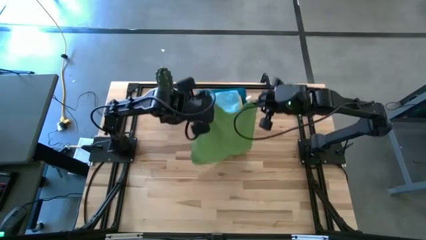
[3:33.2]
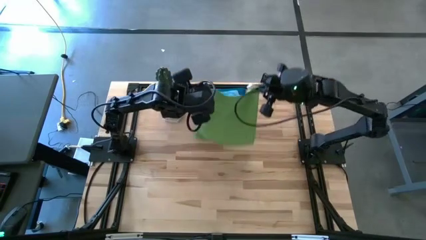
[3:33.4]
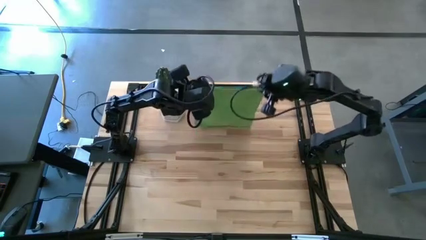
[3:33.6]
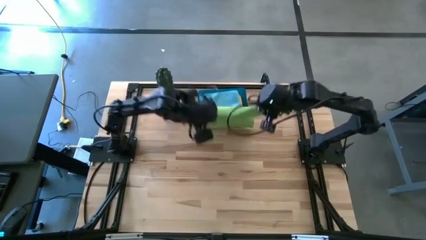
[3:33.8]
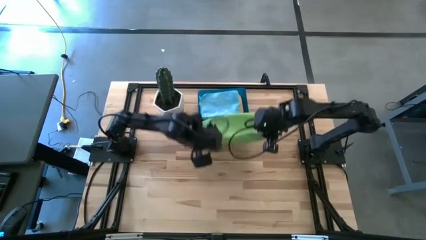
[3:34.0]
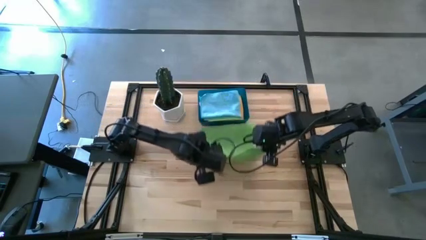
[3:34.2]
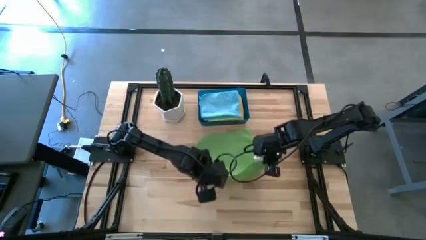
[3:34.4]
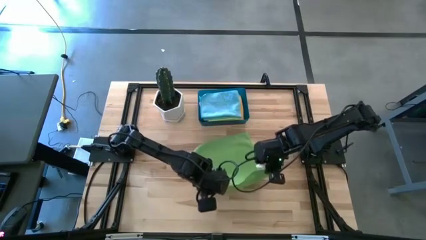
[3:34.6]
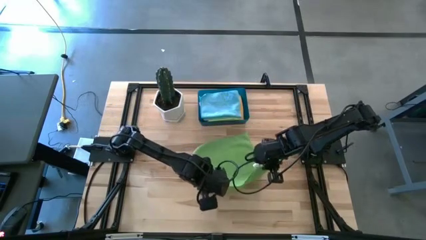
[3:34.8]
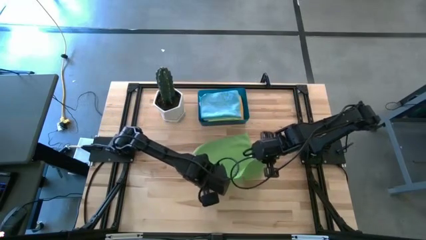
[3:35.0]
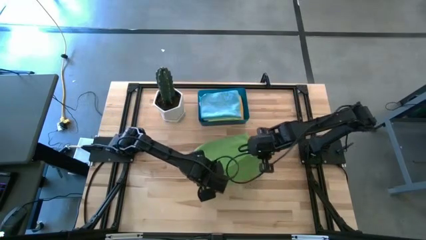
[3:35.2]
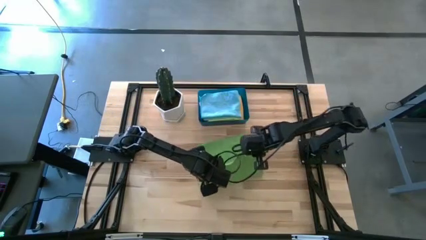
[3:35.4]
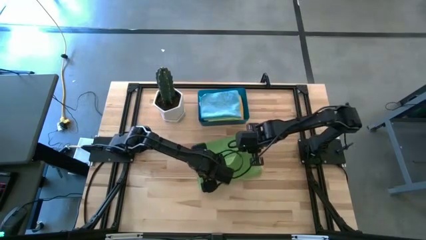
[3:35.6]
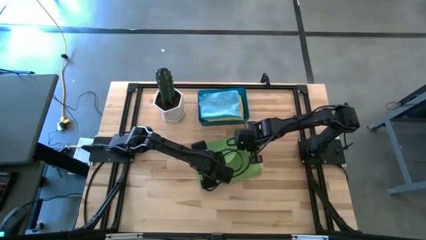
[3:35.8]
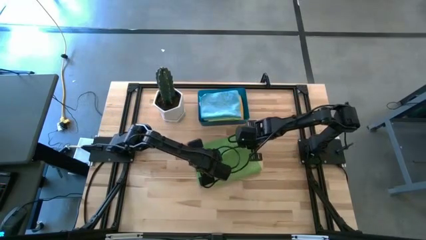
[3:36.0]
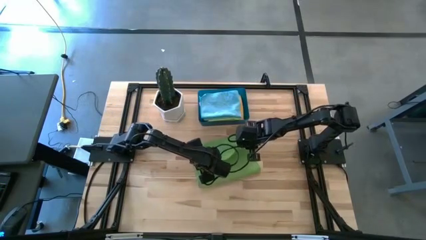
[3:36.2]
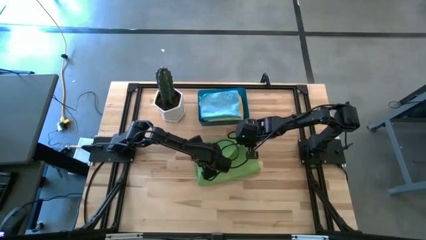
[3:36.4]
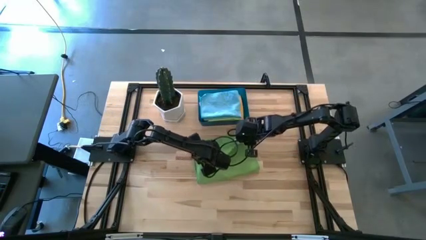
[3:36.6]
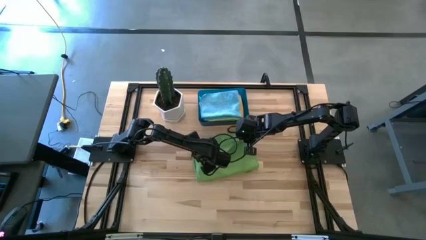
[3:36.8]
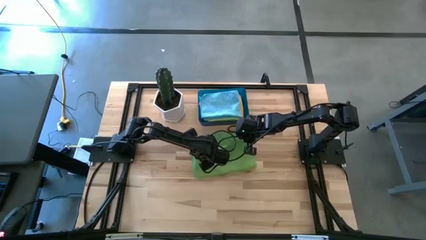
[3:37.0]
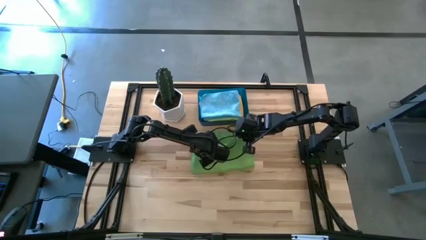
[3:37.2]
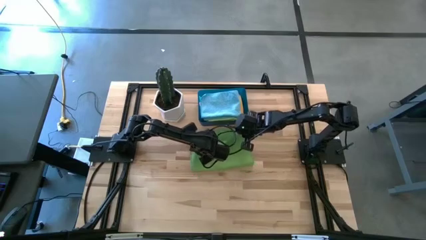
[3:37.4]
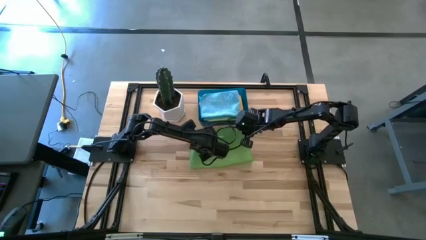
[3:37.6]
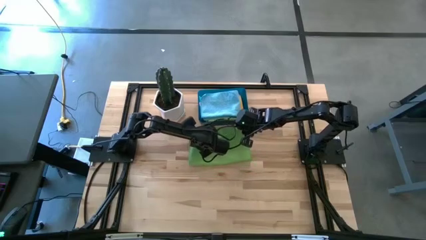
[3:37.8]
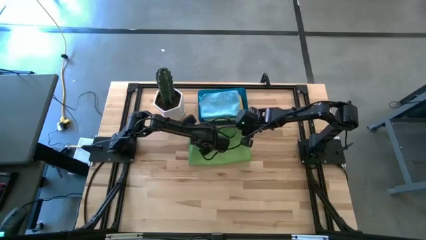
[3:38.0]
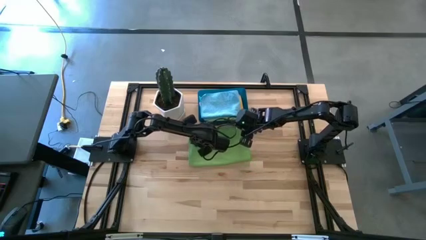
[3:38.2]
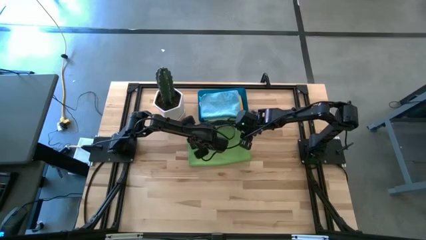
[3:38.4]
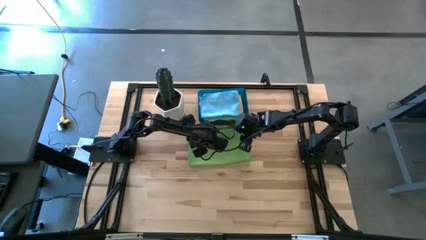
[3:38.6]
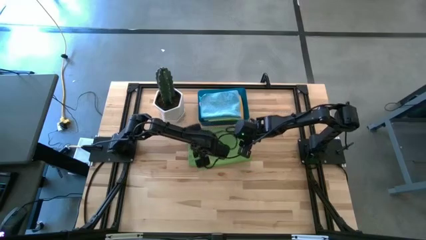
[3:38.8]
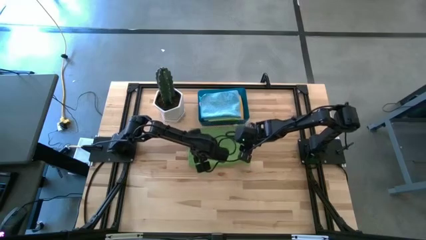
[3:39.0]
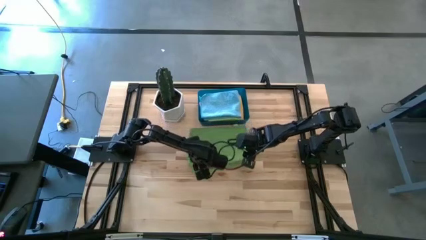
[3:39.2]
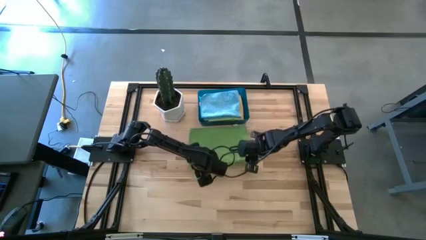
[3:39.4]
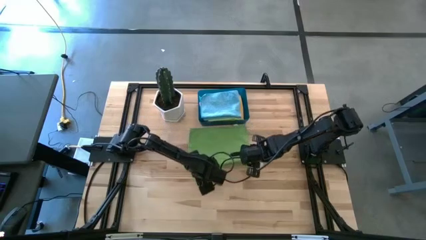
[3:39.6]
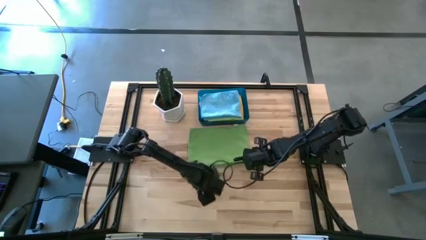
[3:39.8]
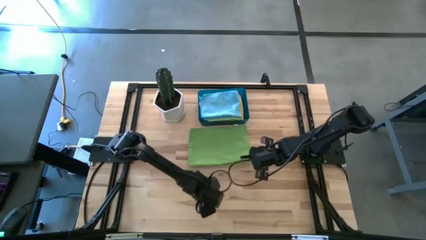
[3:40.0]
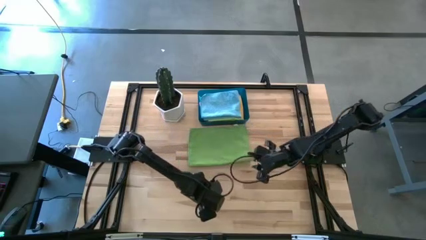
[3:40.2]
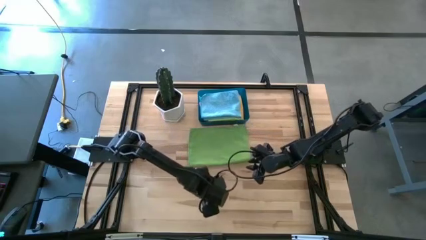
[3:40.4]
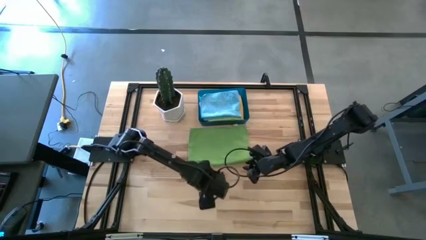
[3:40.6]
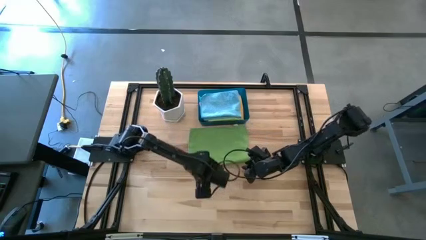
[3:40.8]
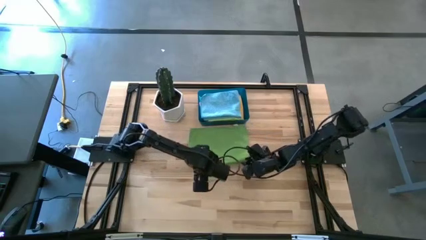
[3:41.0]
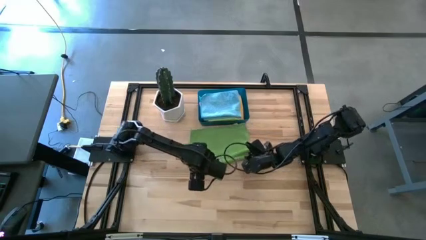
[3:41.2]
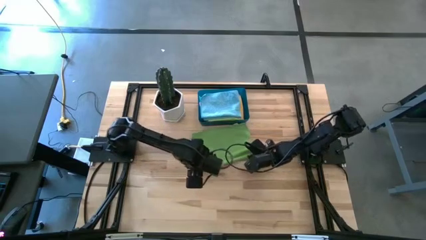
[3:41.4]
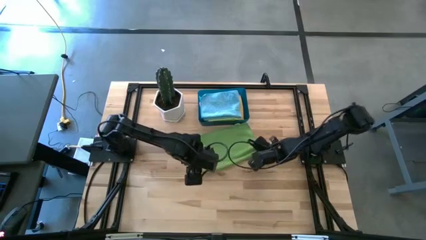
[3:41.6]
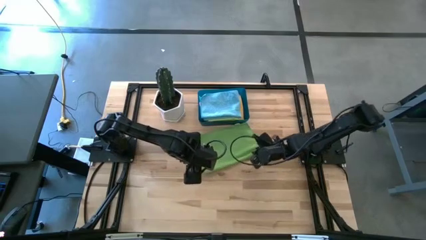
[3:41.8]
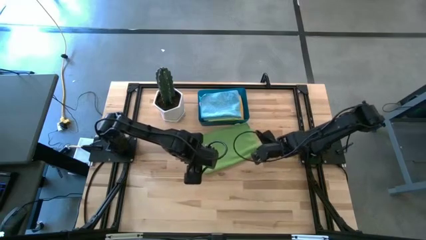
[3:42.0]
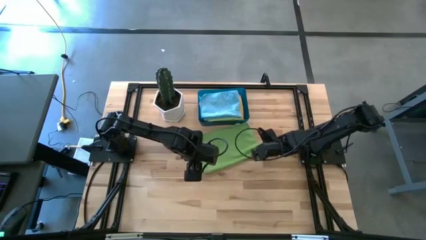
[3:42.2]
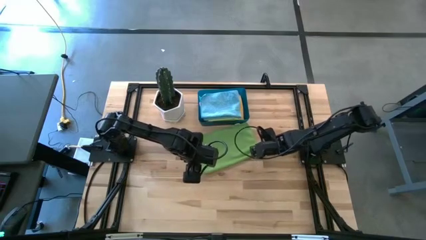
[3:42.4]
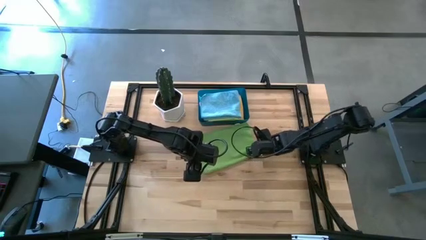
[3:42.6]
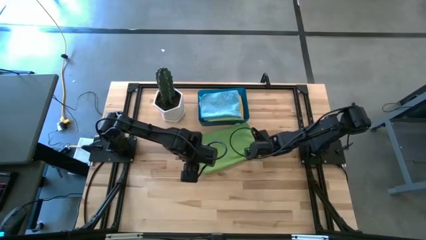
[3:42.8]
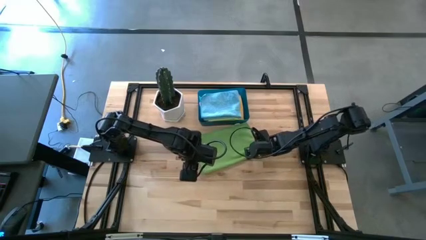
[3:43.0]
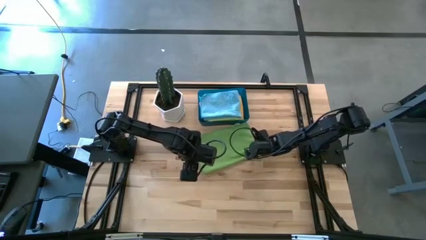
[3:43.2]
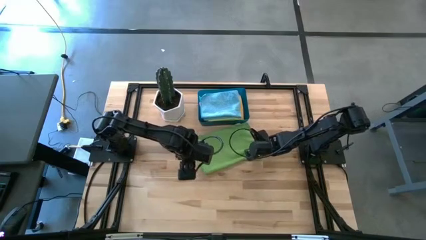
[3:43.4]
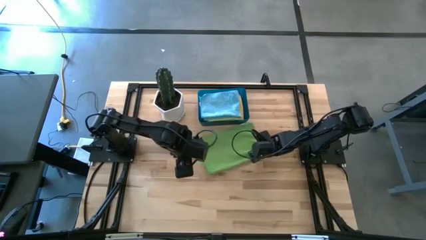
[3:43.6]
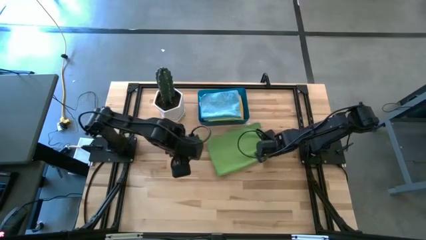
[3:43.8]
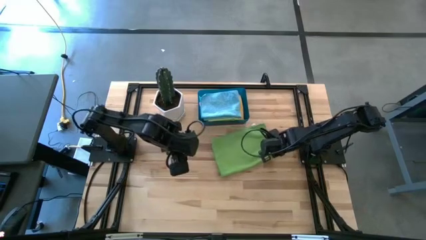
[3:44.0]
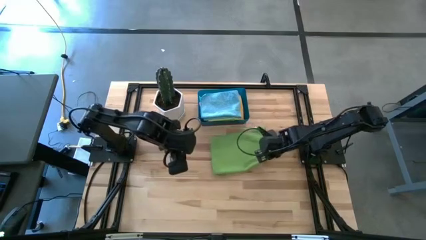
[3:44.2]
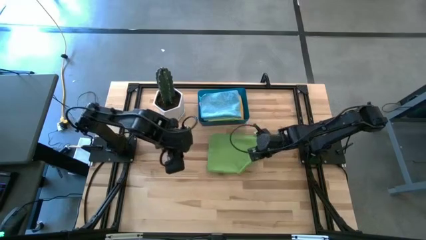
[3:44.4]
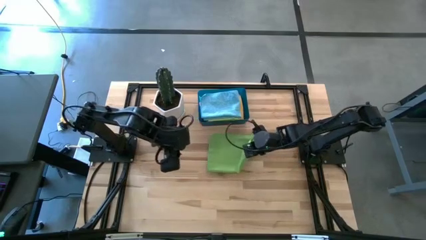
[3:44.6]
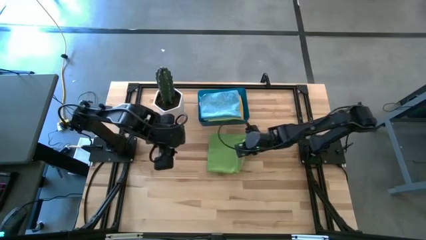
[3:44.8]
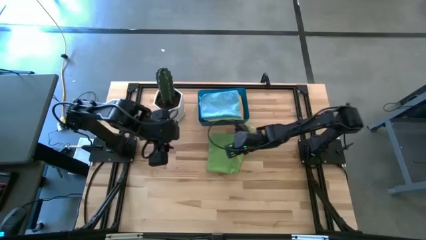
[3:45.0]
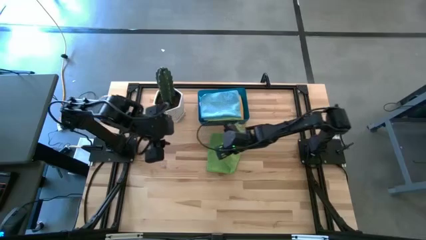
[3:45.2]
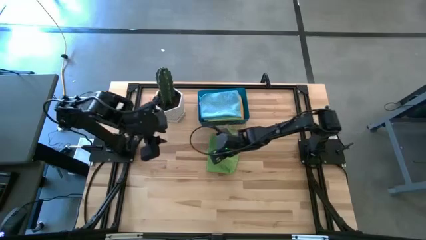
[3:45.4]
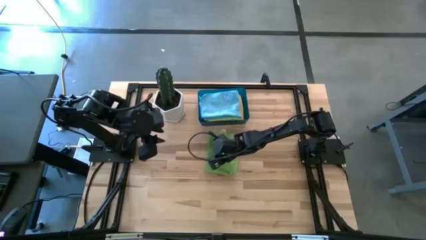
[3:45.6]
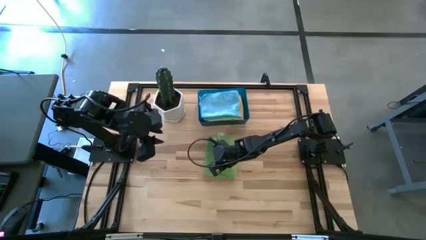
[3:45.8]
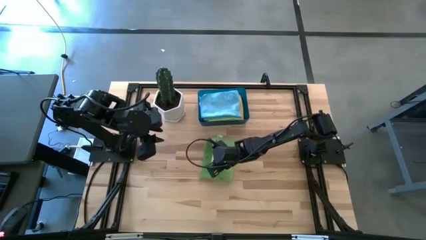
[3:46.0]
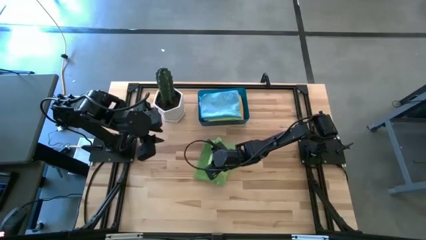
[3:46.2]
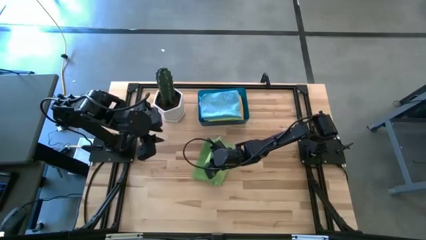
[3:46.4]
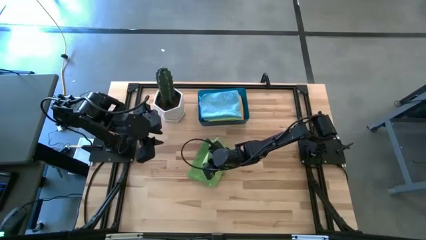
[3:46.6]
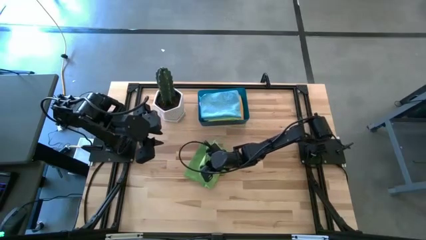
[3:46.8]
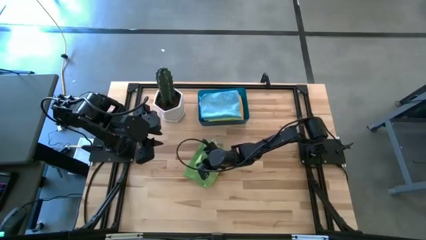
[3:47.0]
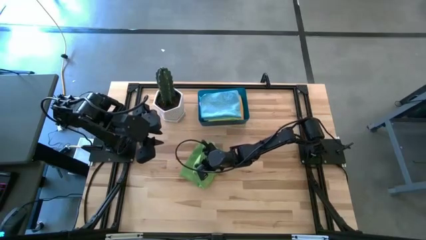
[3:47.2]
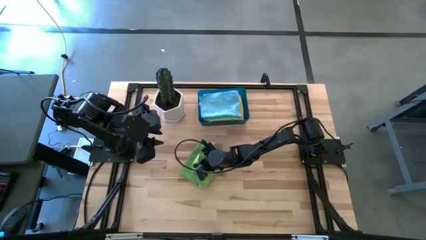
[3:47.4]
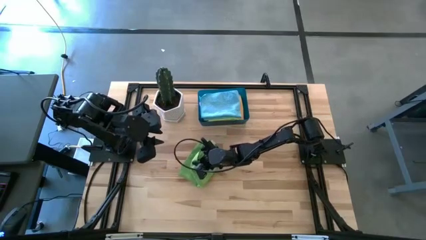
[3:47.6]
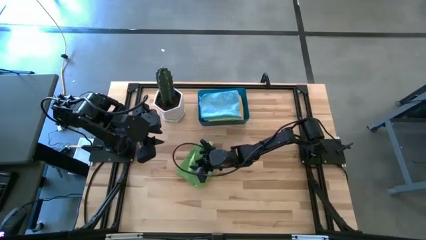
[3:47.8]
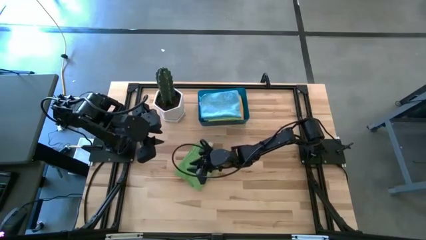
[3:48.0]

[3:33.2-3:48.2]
Task: Fold microfiber towels
Fold the green microfiber towel
